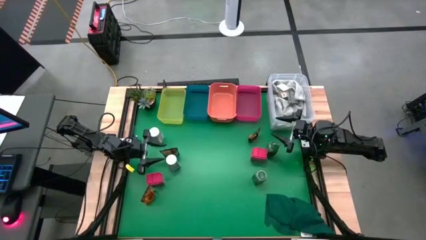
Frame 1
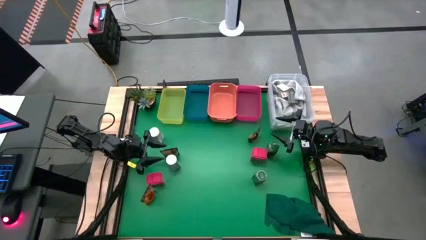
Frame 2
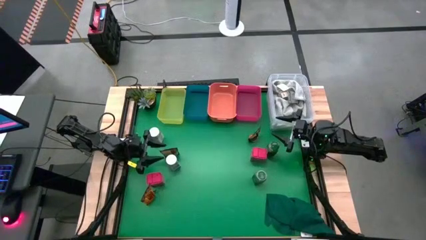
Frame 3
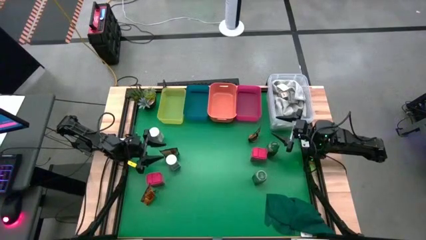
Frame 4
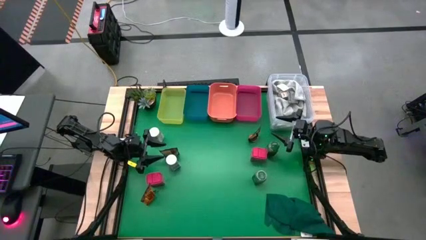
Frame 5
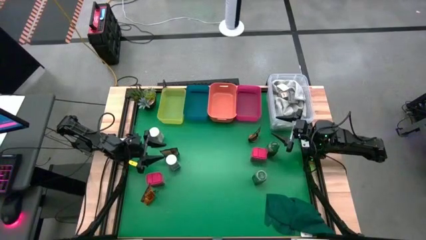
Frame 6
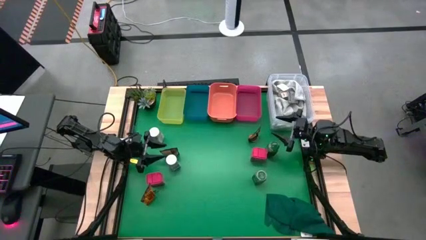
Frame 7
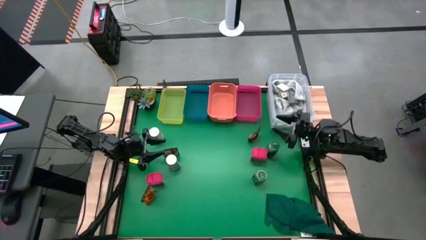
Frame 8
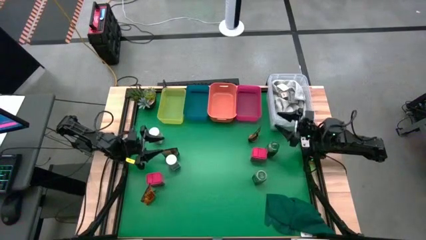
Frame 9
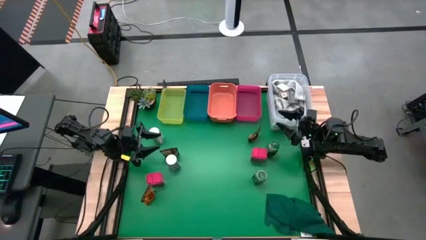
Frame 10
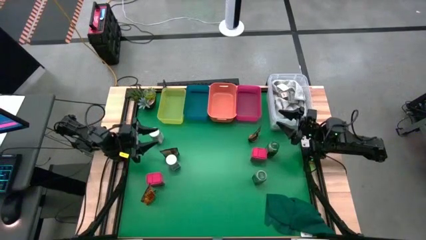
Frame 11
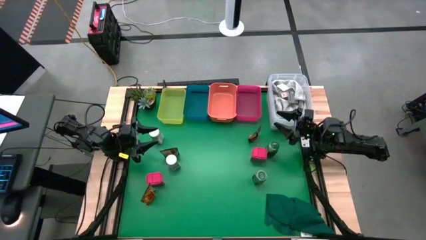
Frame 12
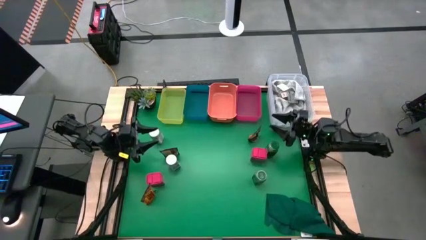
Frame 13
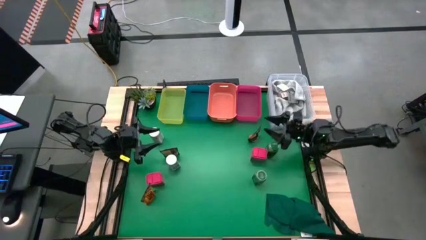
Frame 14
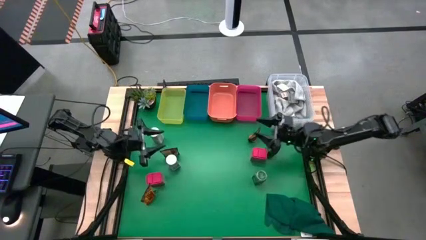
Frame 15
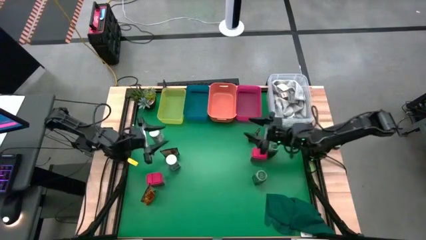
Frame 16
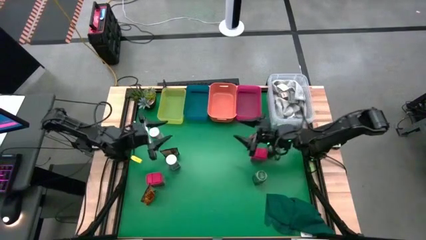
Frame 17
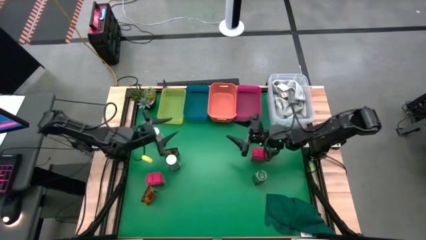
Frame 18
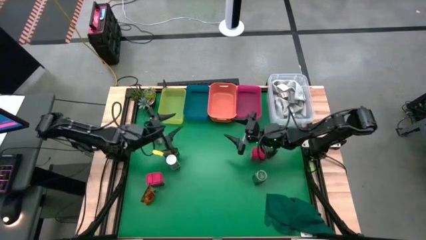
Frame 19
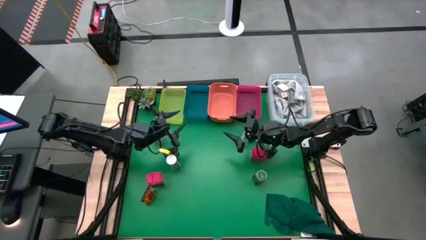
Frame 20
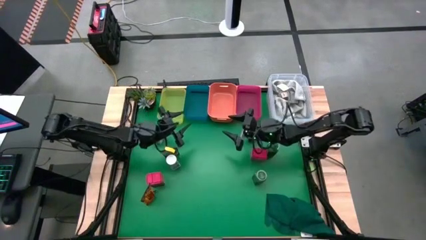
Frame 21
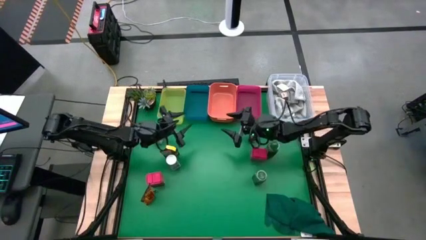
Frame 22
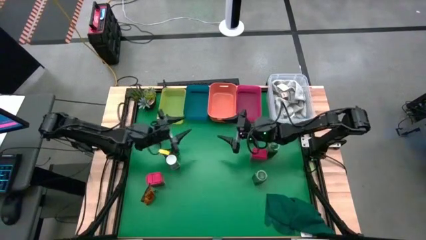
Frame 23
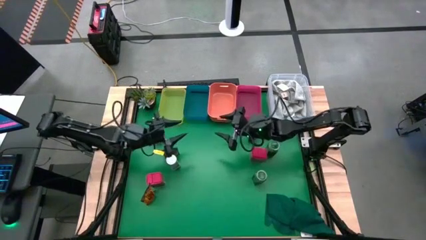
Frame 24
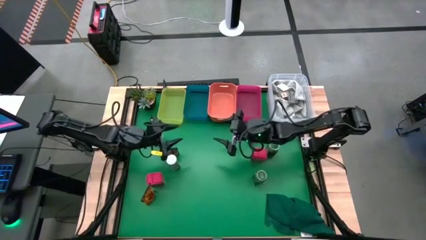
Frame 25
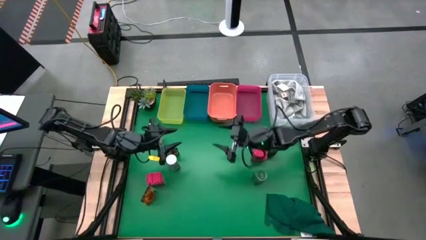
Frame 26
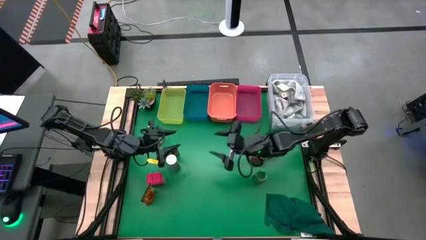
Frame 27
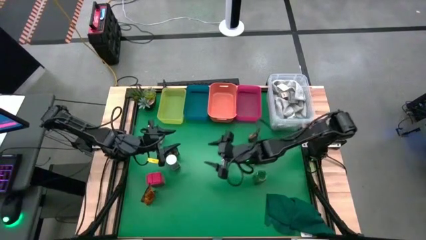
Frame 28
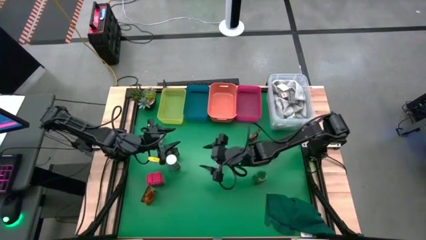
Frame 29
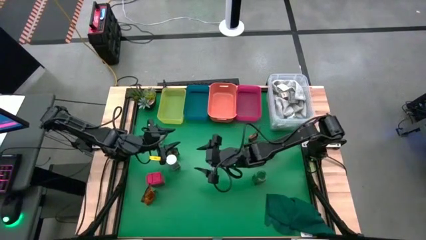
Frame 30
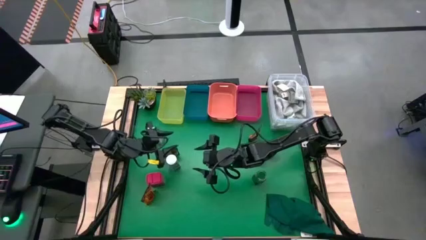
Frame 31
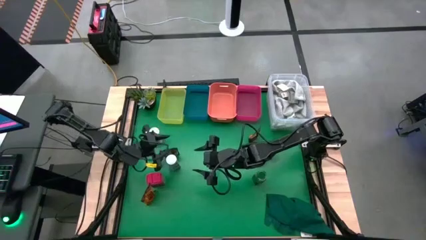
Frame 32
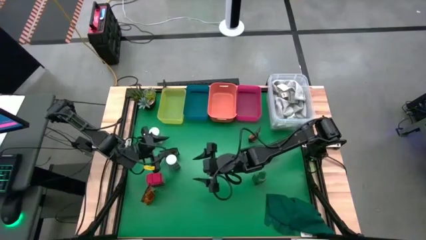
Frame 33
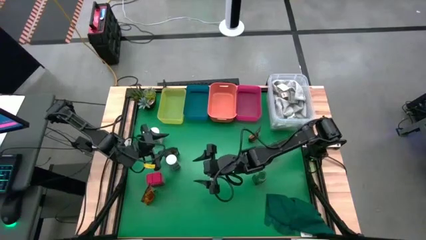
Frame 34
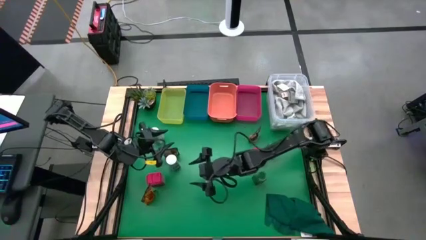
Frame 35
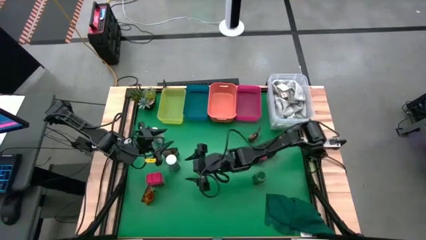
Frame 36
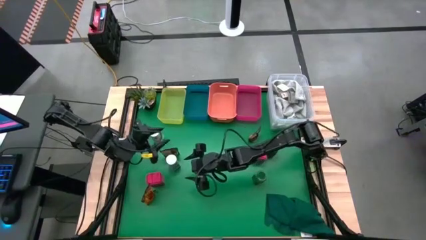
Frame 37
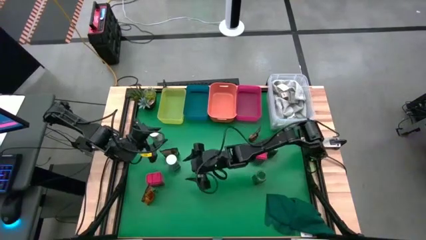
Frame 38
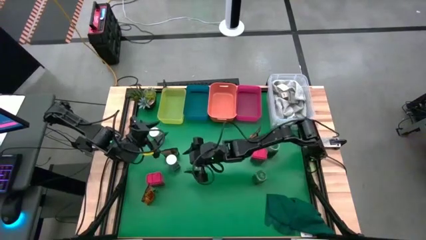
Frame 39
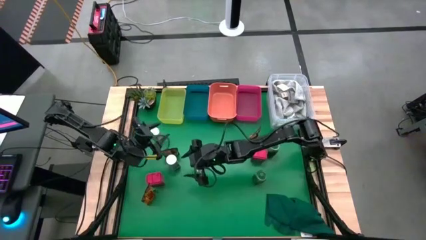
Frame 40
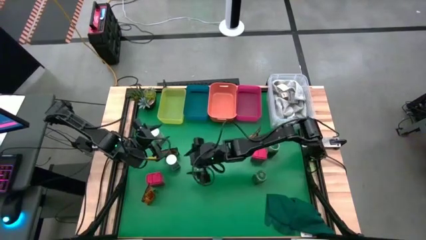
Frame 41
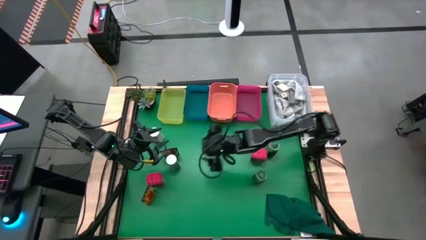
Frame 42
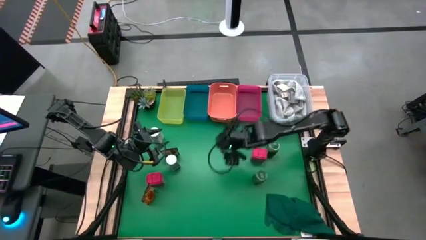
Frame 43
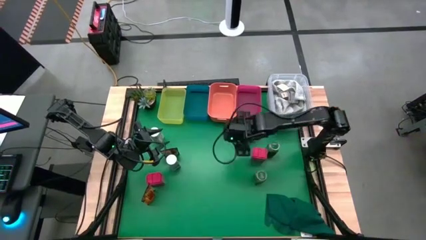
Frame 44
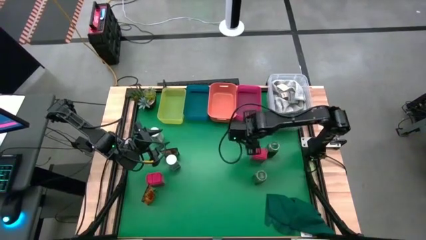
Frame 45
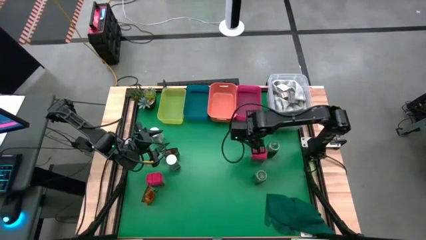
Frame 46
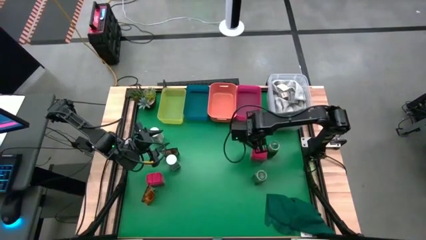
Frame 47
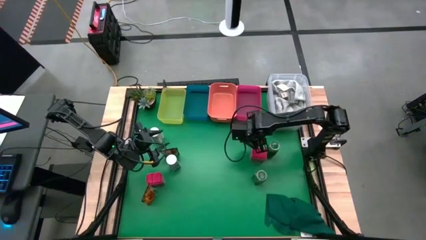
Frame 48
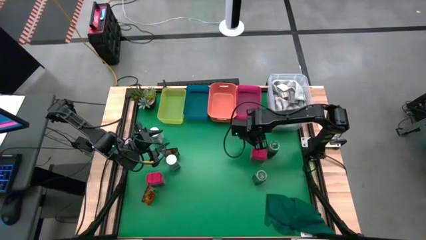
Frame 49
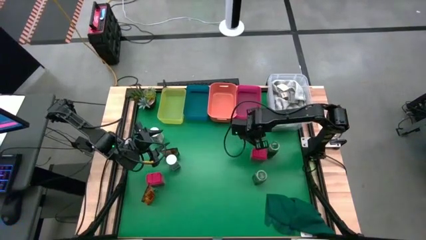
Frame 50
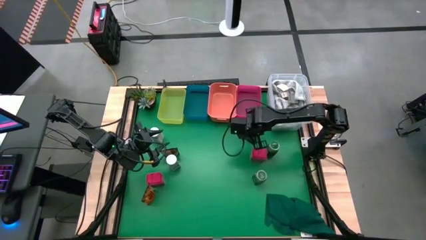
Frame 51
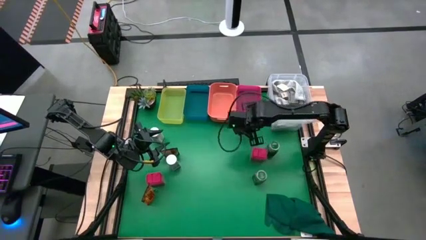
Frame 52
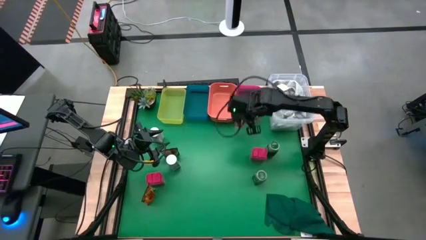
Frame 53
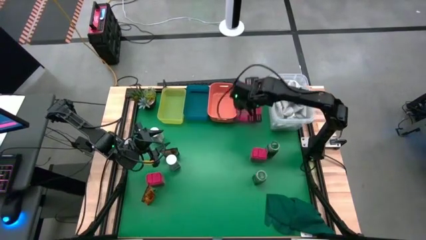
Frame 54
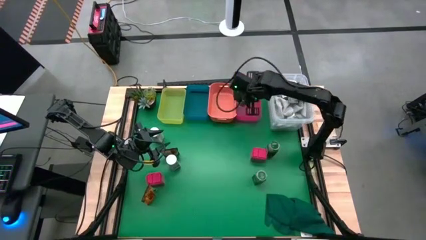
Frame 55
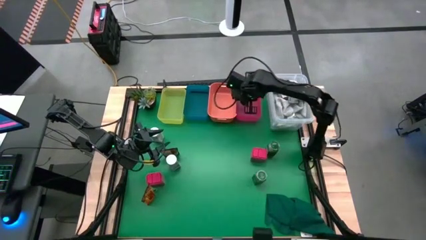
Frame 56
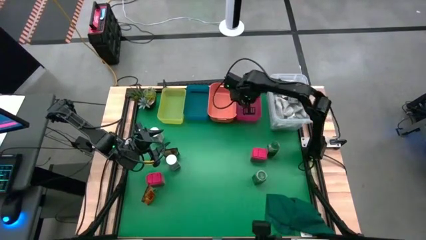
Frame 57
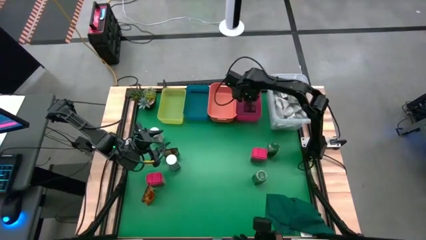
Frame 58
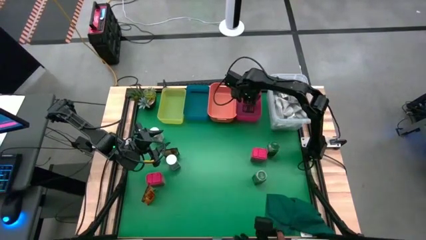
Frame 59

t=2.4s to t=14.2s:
Task: Sort spices by type
Put the top right orange seasoning bag into the pink bin

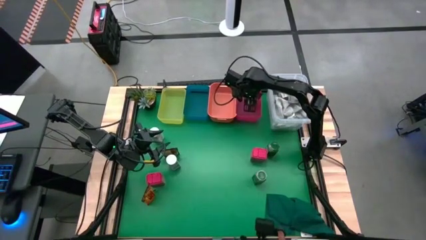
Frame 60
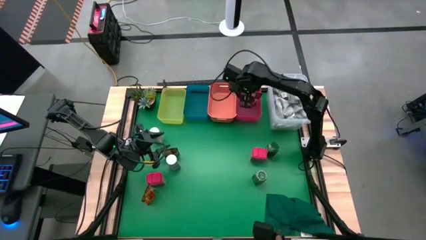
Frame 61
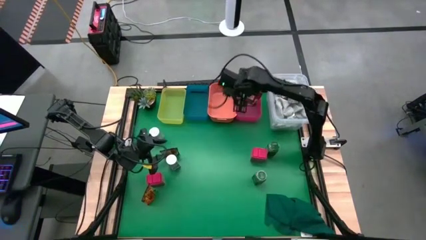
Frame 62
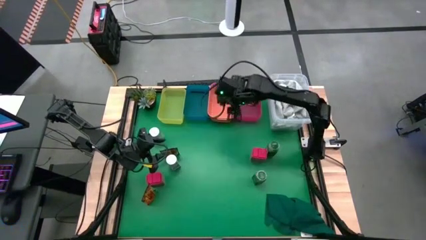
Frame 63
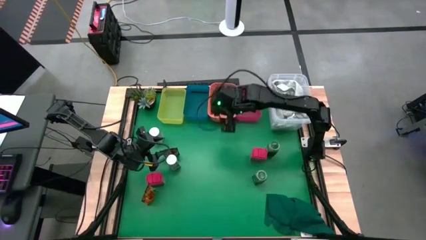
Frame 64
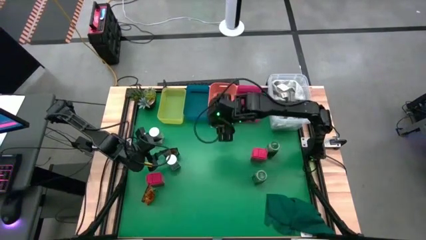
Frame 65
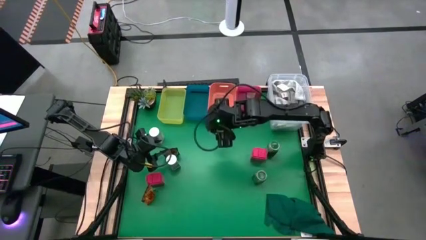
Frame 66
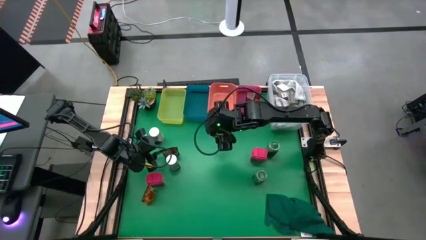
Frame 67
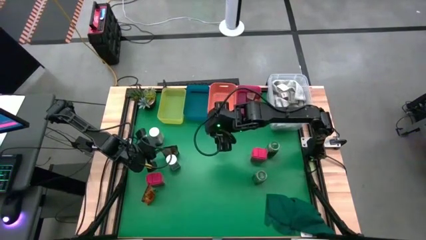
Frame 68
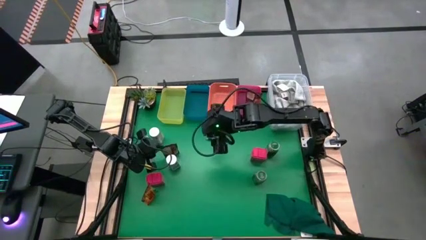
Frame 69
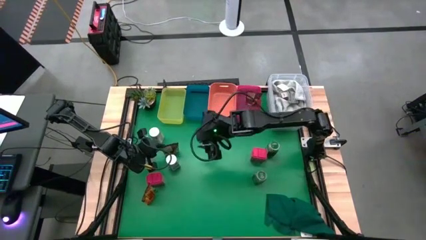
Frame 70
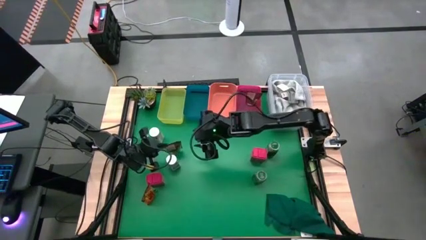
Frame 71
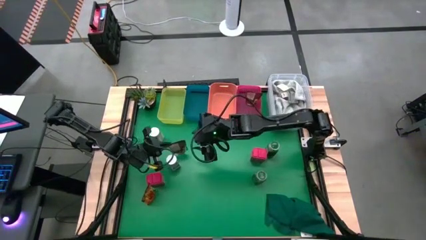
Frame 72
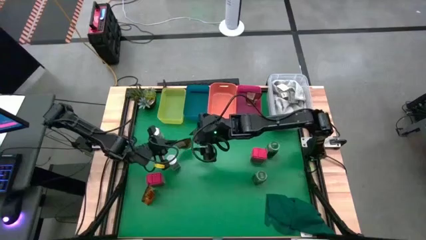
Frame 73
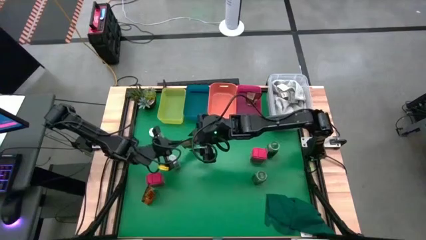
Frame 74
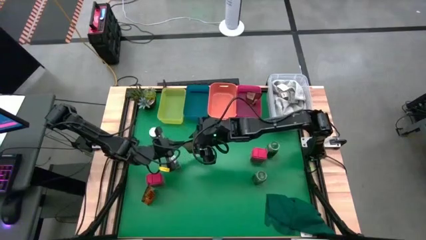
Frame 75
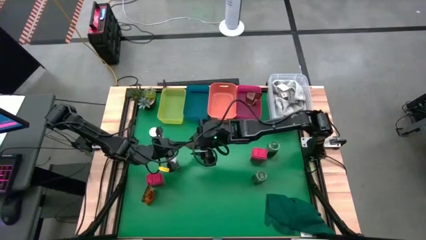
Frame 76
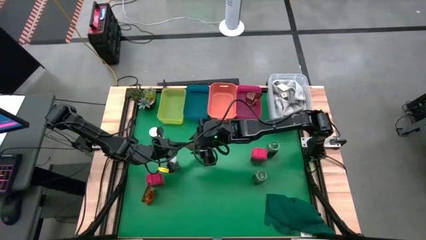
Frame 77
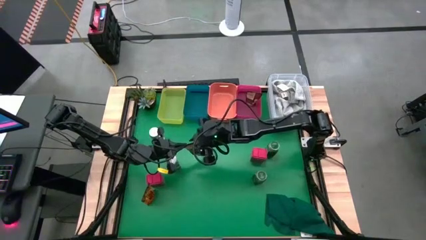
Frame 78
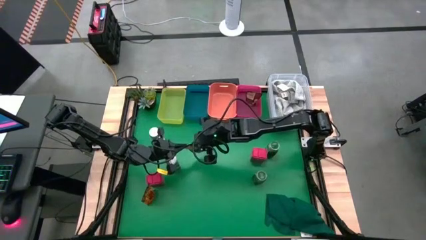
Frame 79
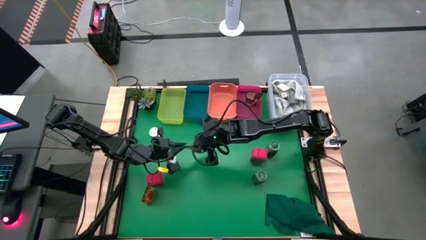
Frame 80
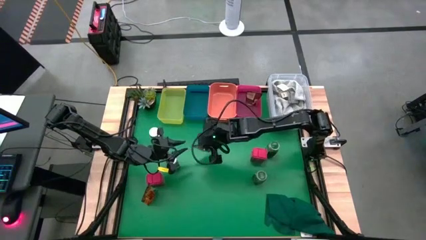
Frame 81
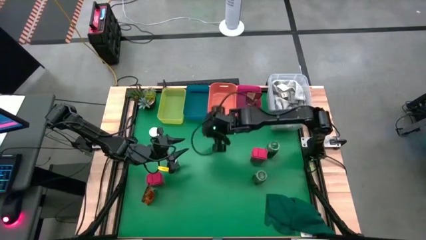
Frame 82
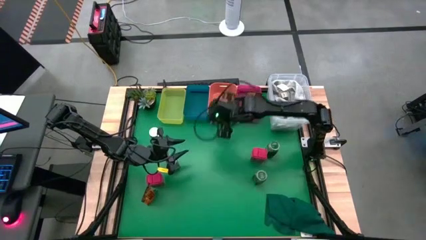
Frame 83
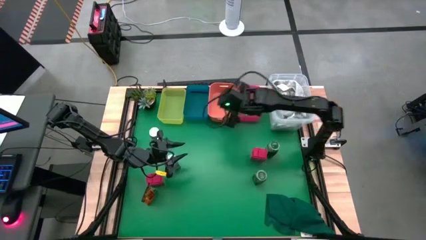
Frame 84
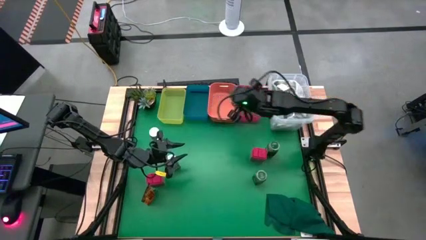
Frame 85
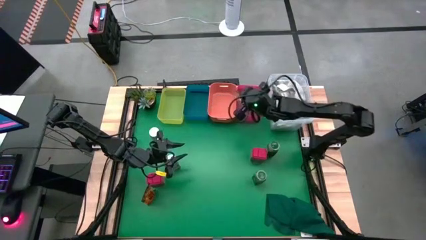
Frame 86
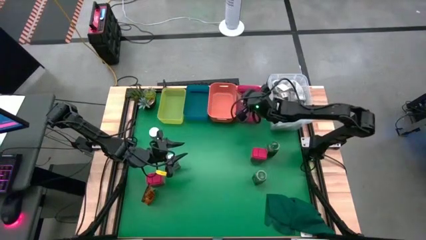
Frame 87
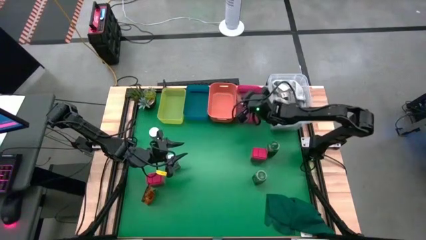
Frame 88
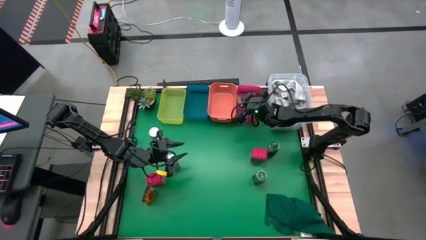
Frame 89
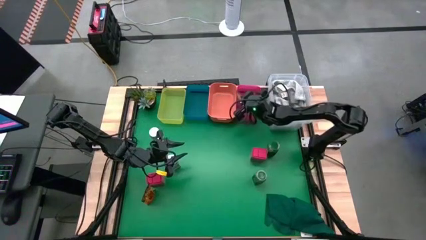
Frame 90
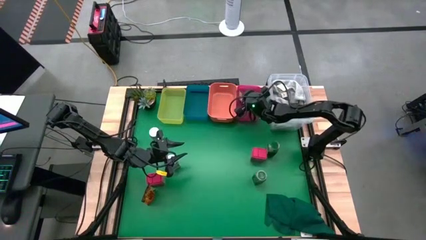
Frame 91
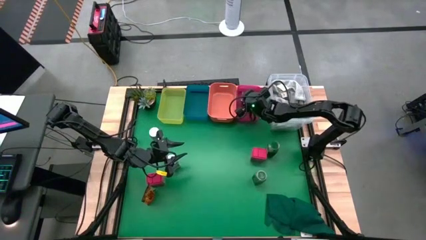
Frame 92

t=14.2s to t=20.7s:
Put the top orange seasoning pack into the pink bin
